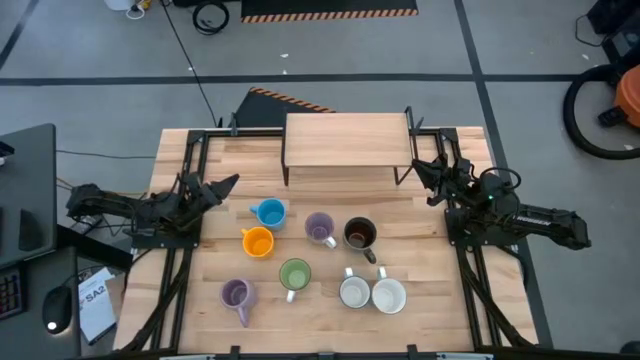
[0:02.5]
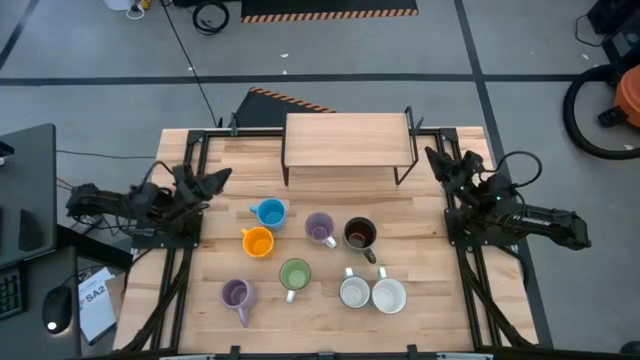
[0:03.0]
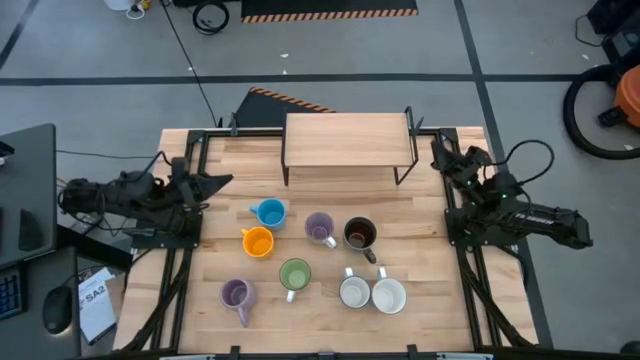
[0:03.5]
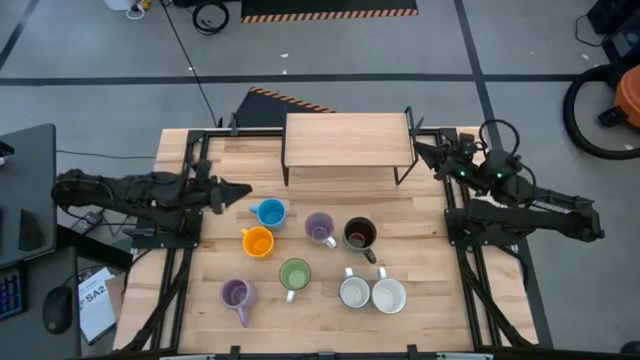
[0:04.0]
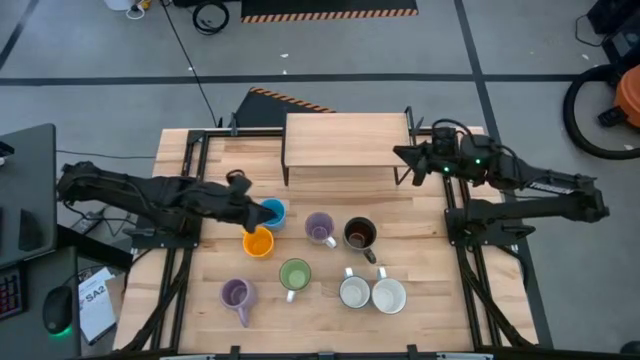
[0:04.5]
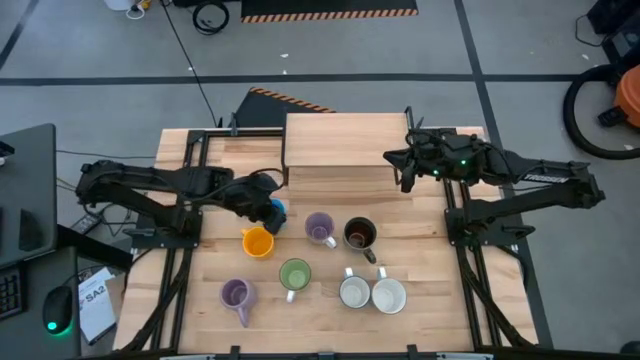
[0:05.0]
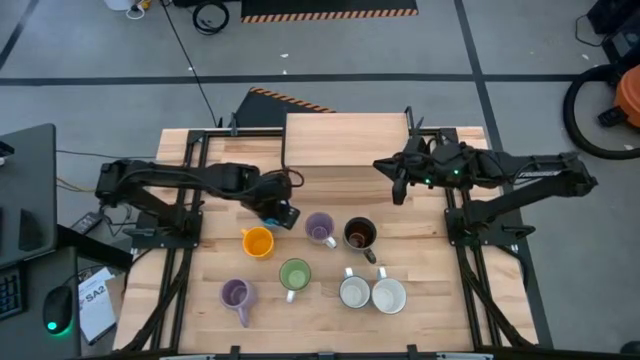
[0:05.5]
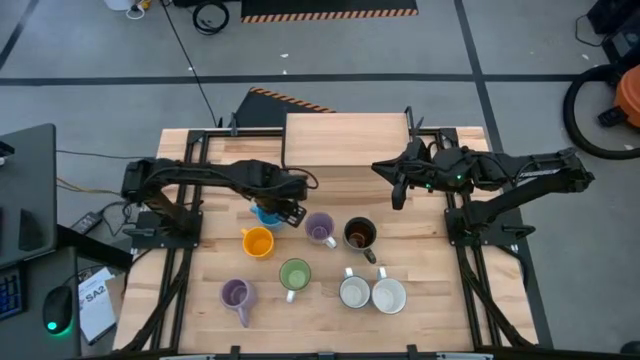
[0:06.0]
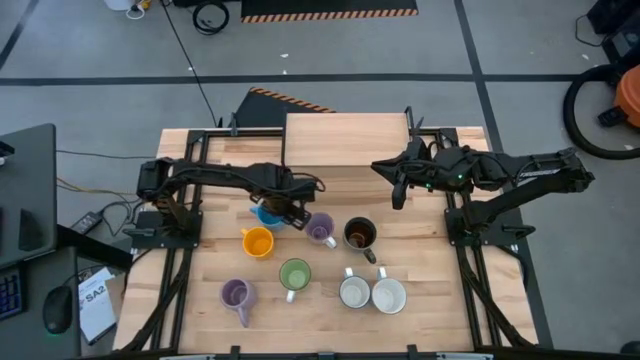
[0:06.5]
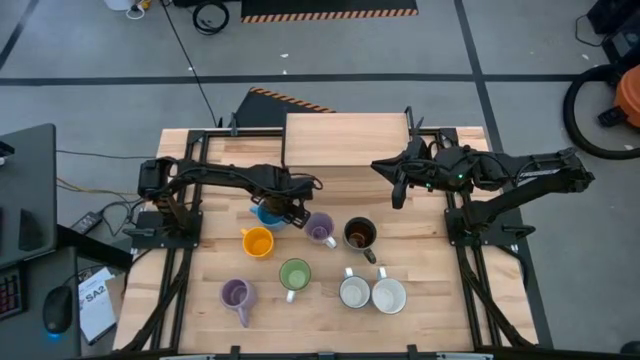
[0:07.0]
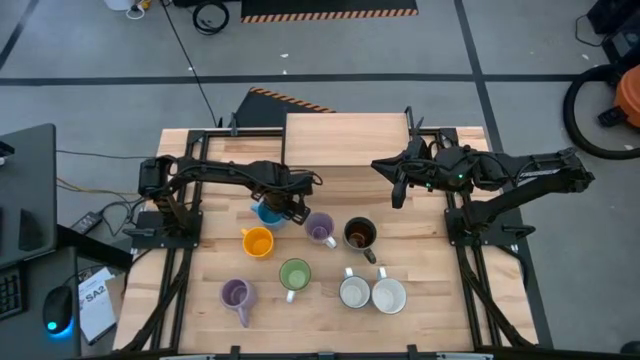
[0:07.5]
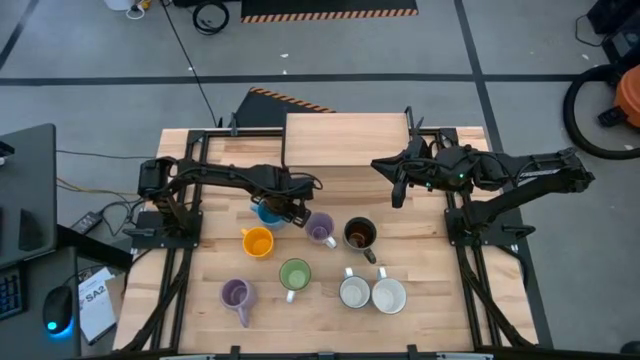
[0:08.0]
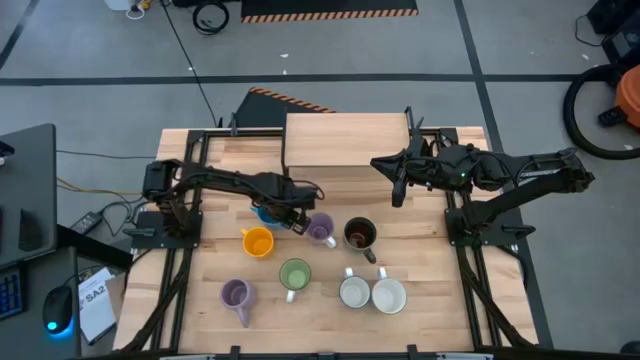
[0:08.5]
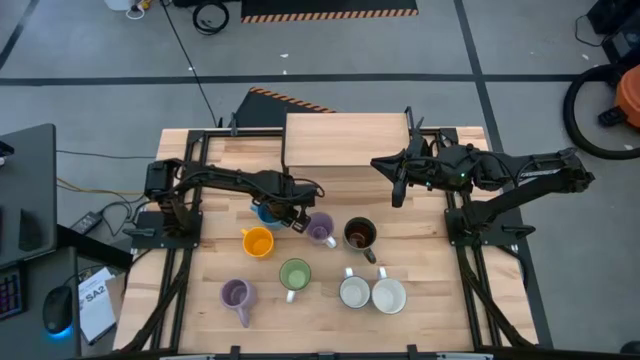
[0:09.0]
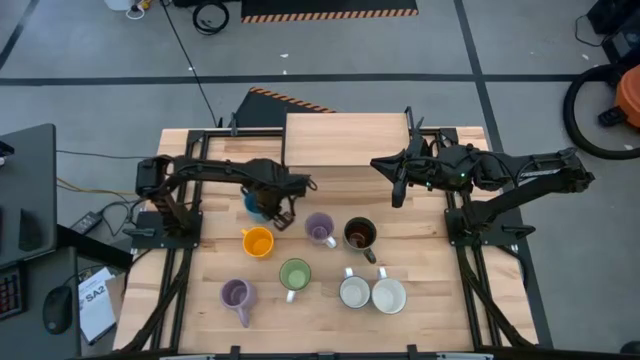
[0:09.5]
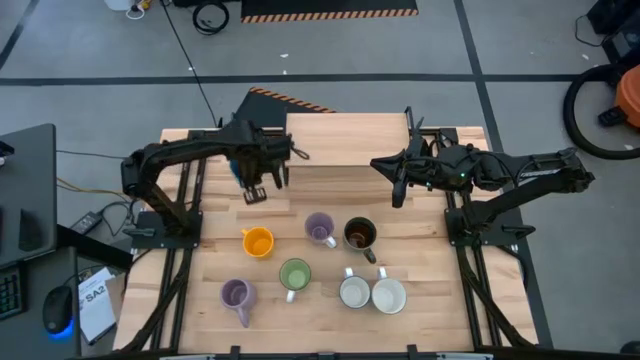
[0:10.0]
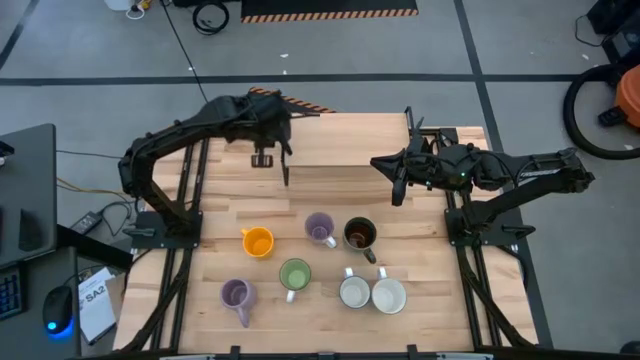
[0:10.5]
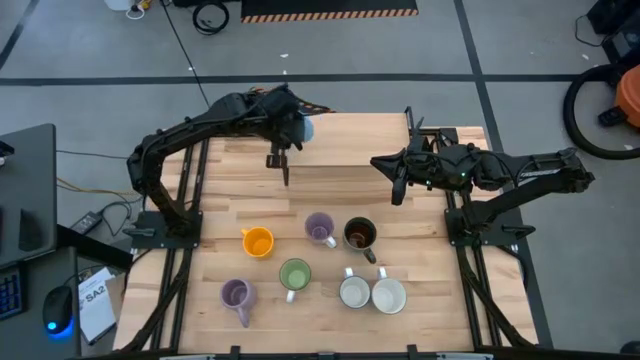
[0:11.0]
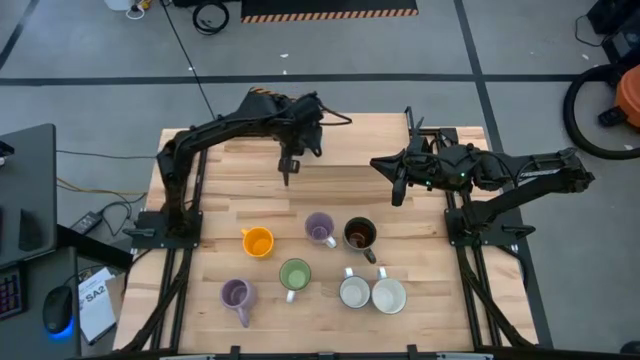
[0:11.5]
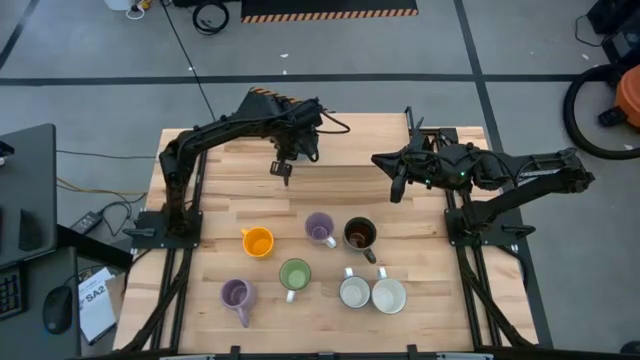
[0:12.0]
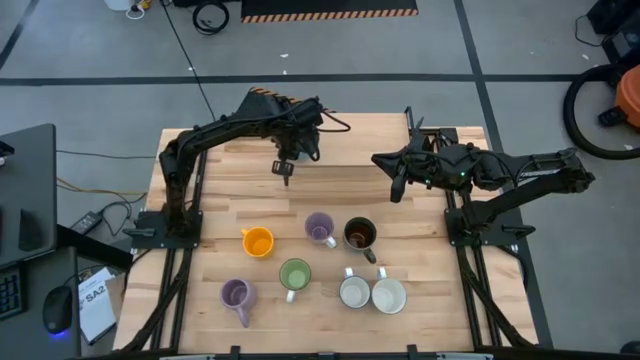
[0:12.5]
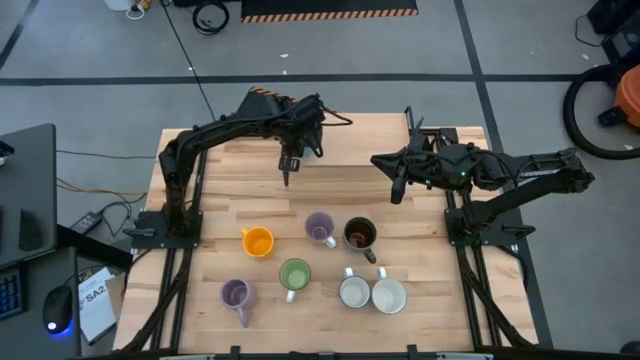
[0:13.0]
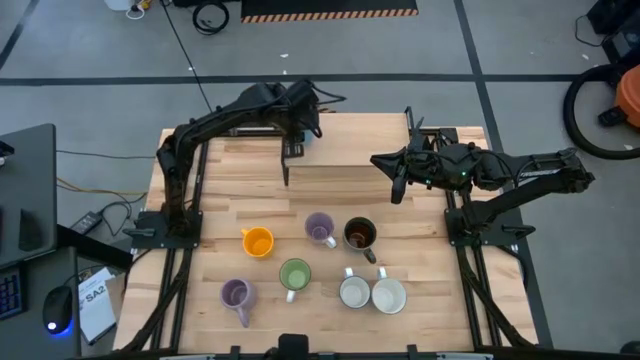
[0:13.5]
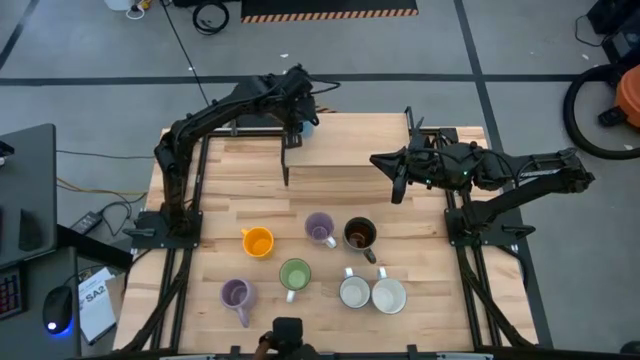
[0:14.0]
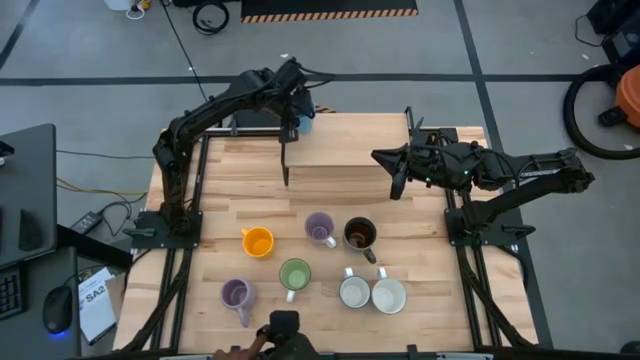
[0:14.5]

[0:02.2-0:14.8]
Task: Place coffee mugs
Put the blue mug on the shelf

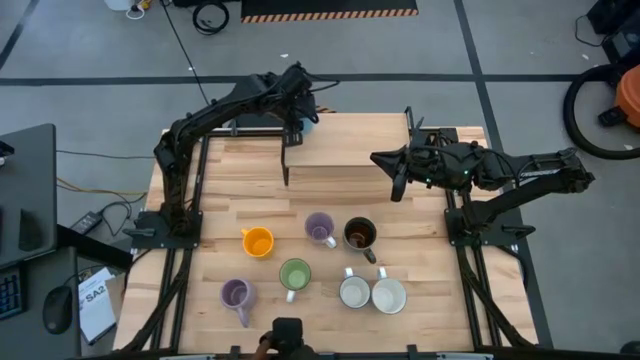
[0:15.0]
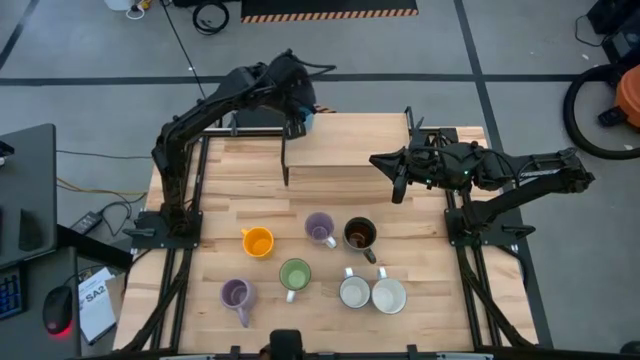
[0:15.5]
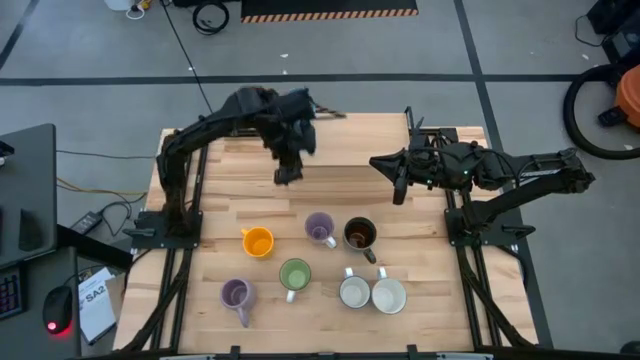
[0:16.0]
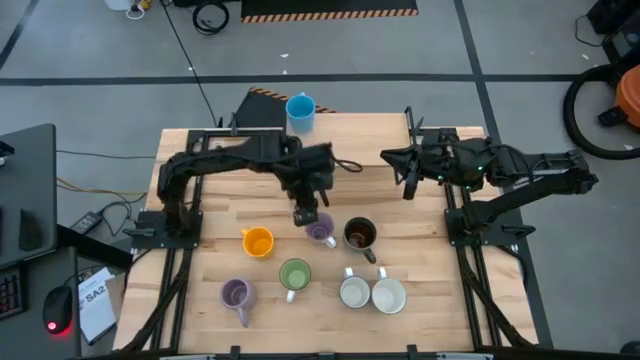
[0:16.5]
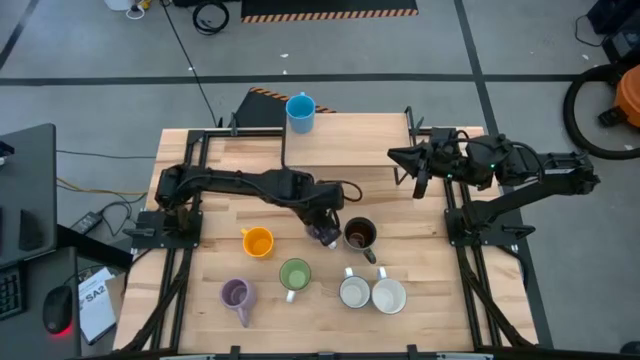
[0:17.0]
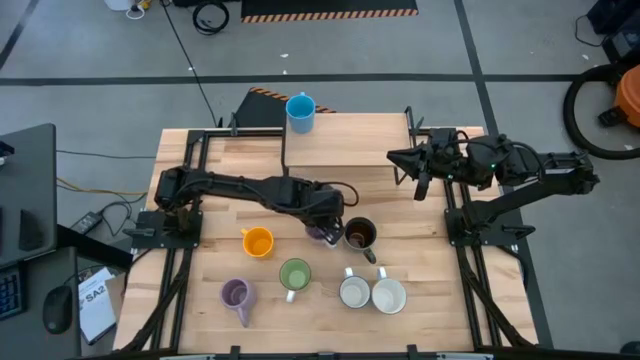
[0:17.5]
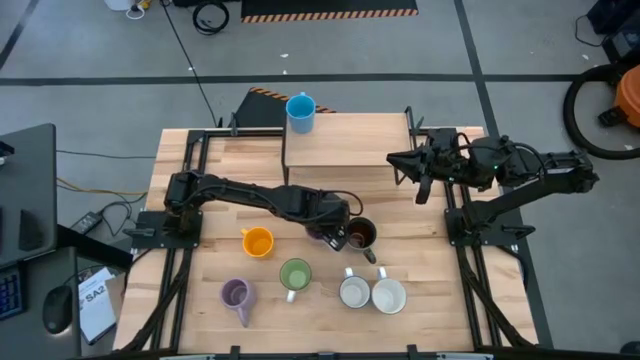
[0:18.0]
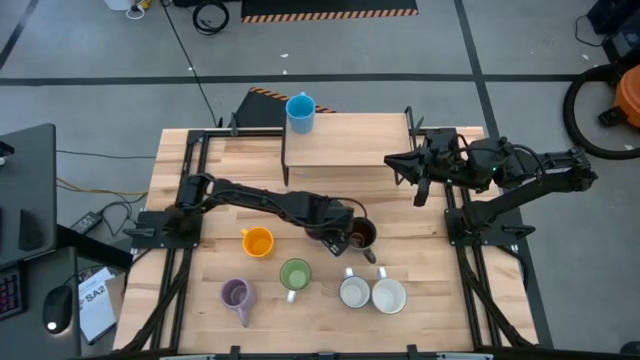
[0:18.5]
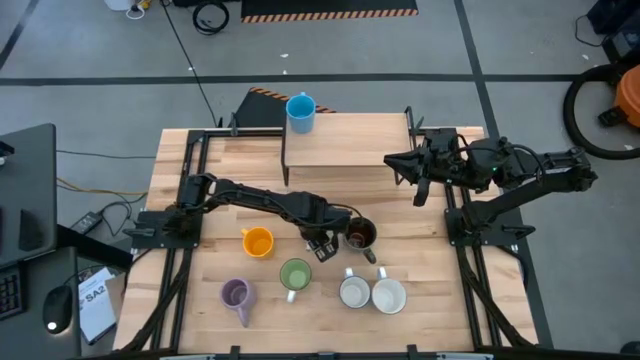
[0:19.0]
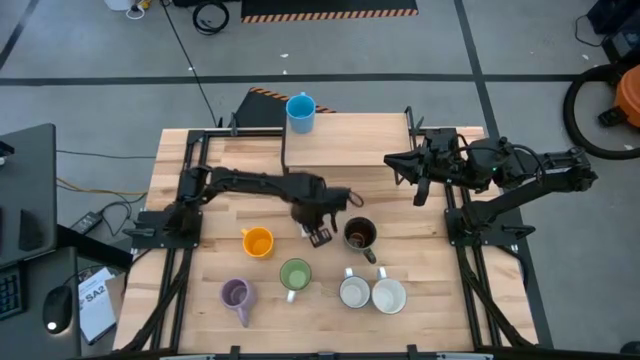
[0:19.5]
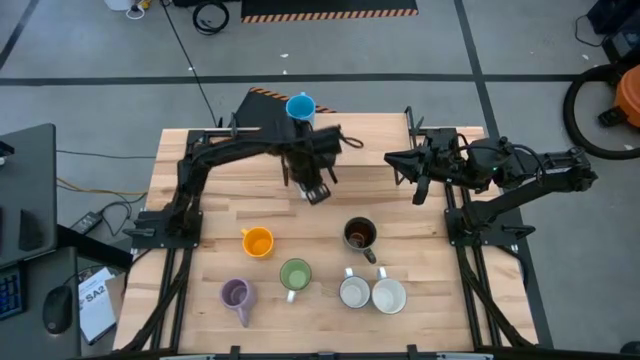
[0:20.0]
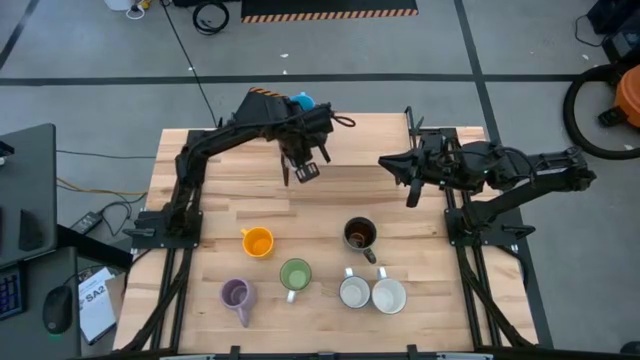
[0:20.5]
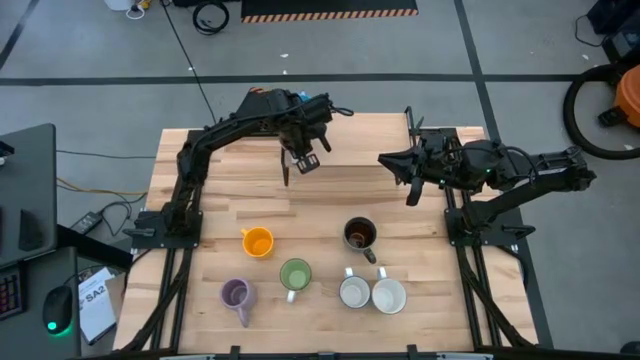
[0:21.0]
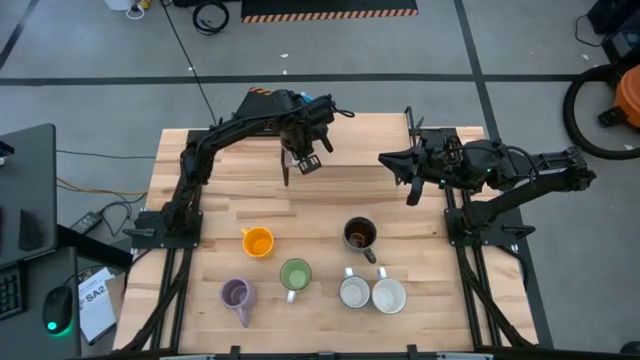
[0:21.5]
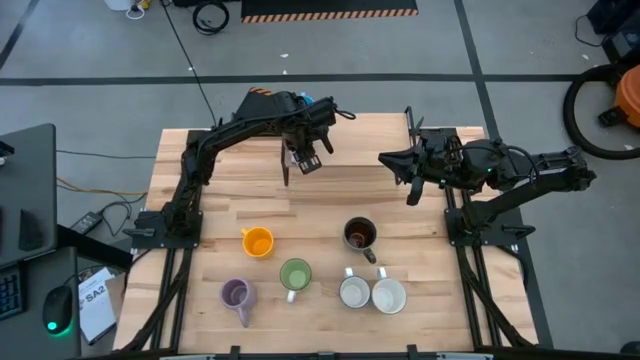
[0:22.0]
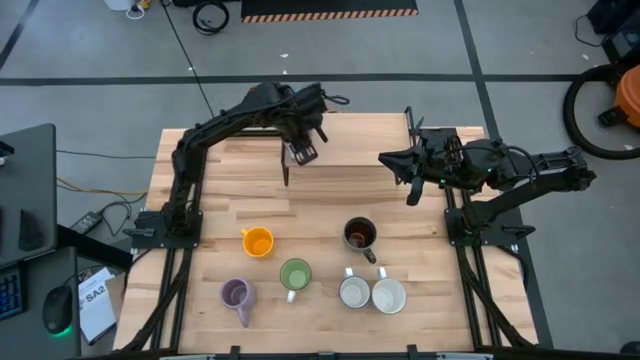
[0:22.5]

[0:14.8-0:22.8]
Put the top violet mug on the shelf
